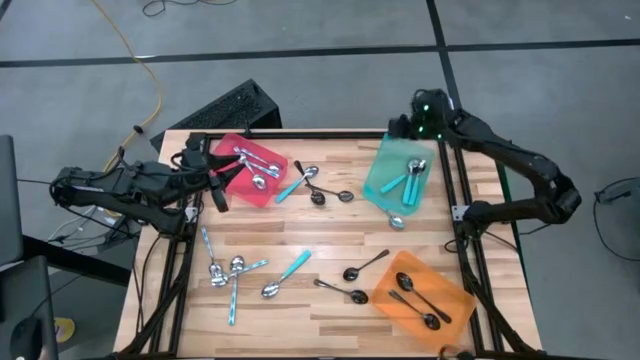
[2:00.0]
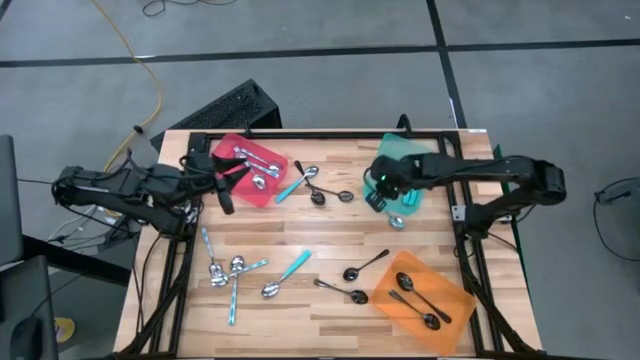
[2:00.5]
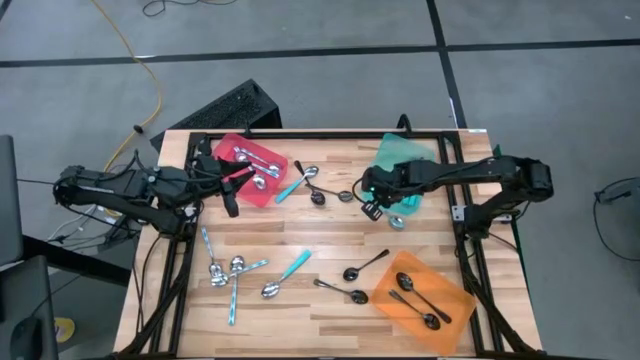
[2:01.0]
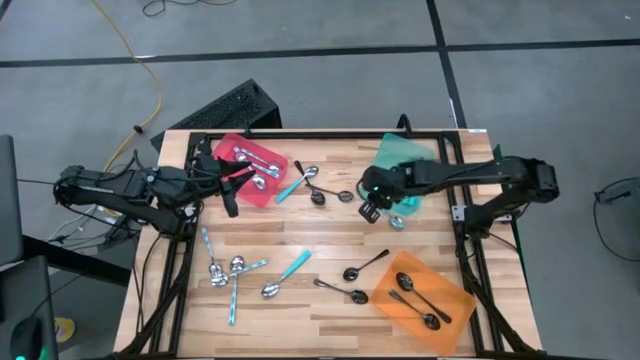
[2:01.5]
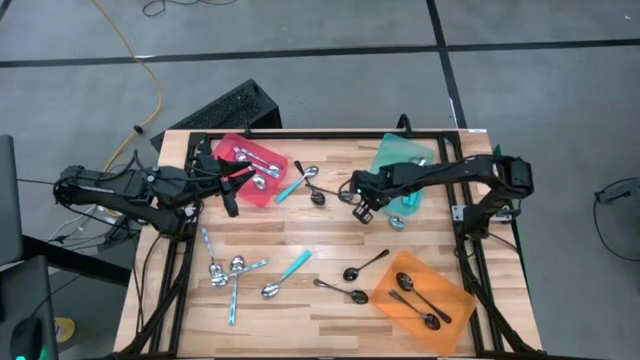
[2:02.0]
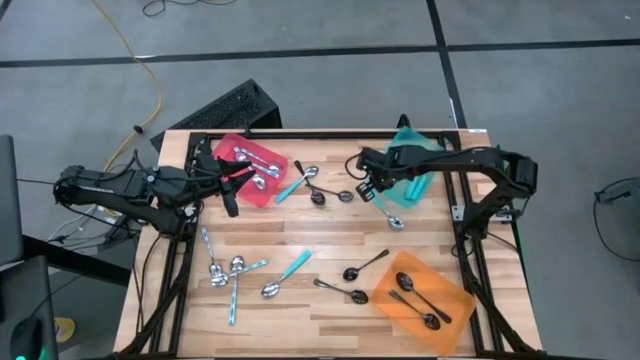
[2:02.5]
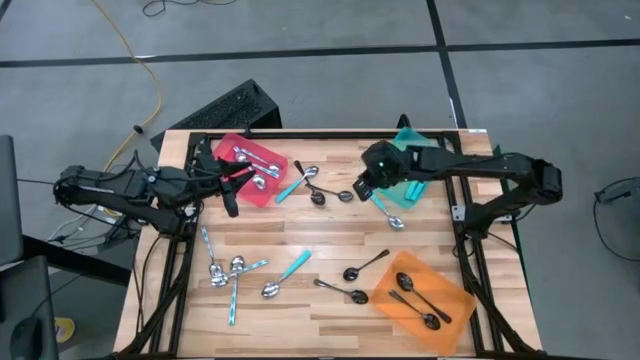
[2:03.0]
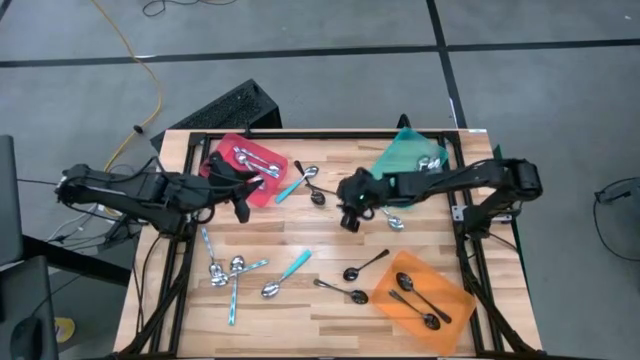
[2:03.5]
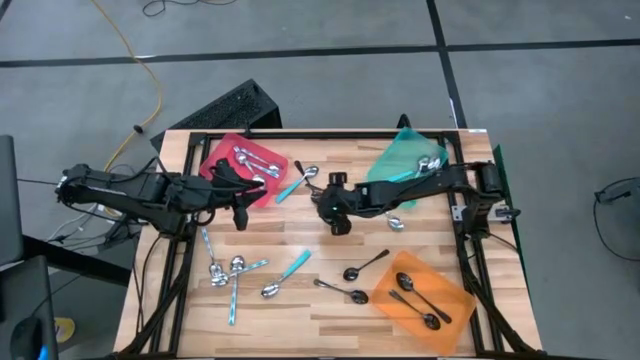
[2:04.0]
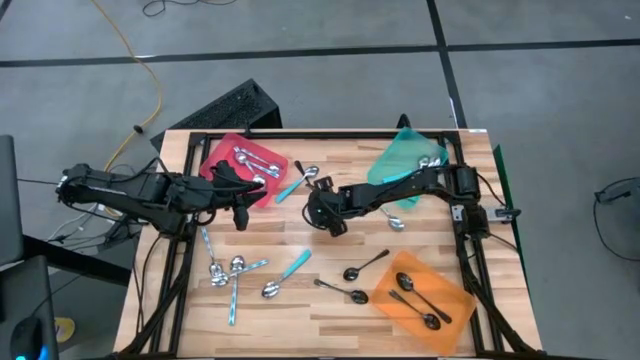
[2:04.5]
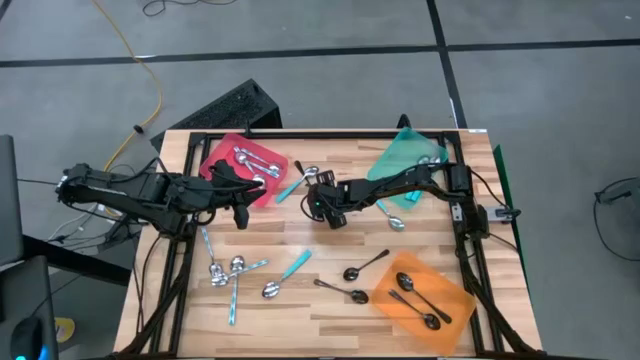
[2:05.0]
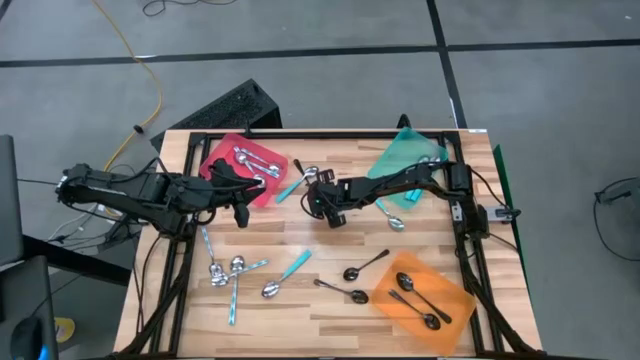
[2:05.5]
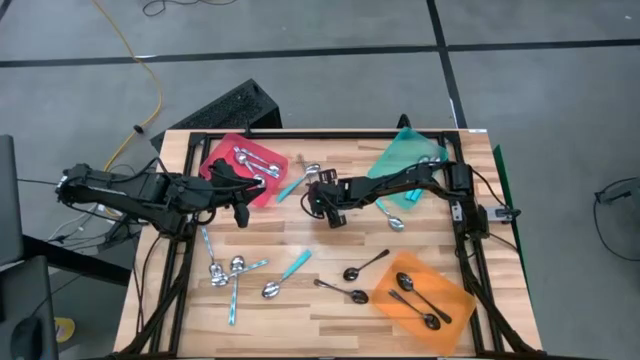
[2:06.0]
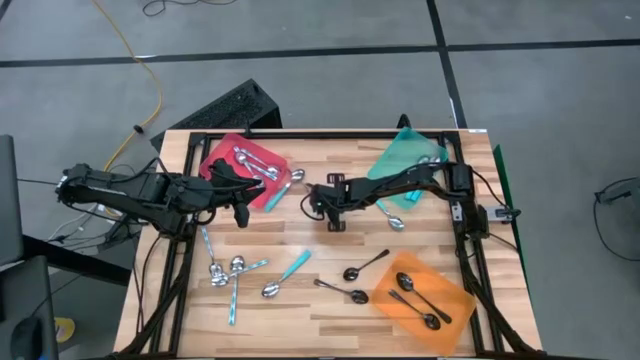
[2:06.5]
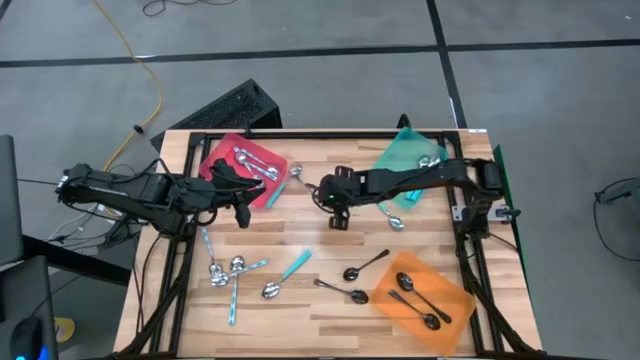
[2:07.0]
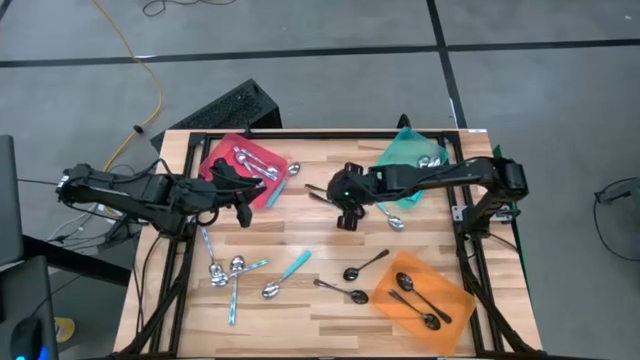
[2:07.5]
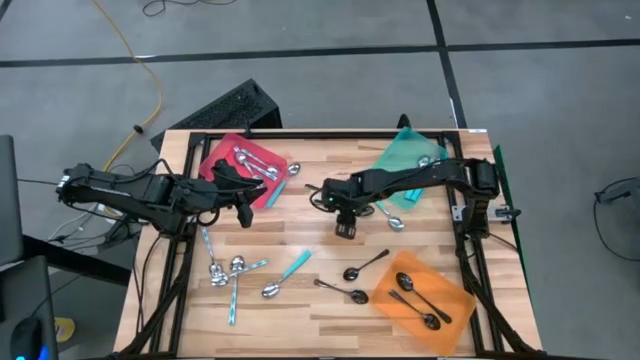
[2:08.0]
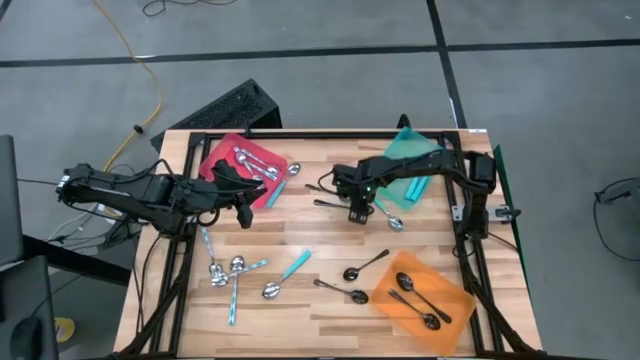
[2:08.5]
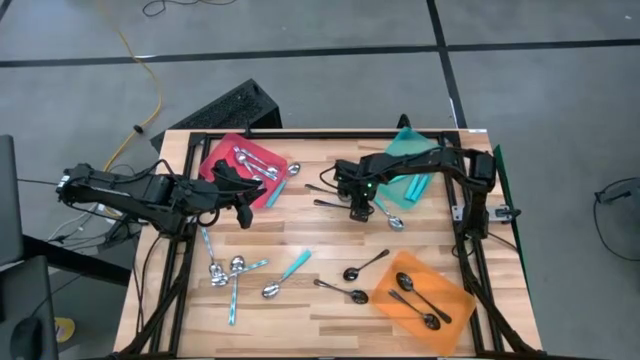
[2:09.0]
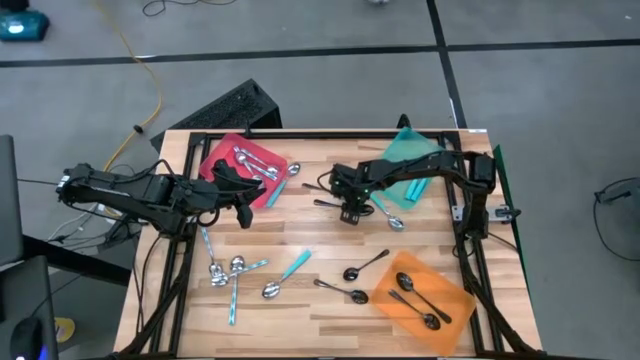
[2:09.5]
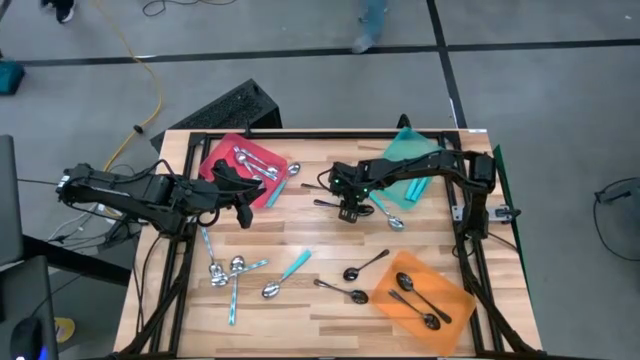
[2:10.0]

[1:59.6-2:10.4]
Task: Sort silverware by color (type)
Put the black spoon into the orange bin

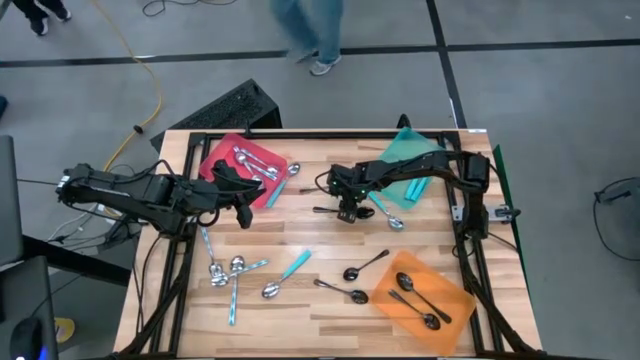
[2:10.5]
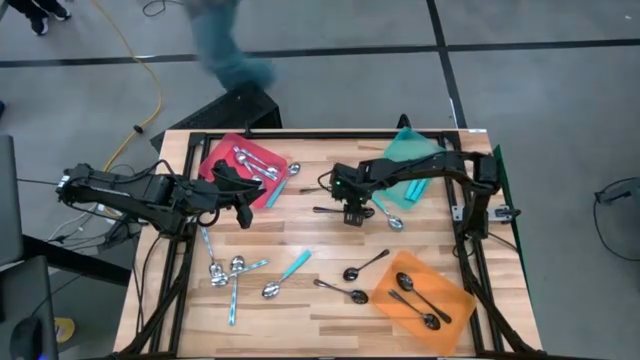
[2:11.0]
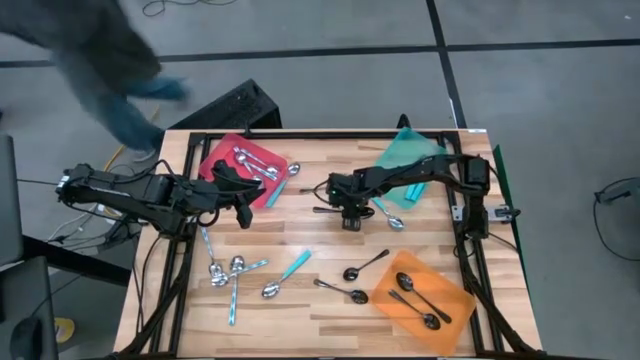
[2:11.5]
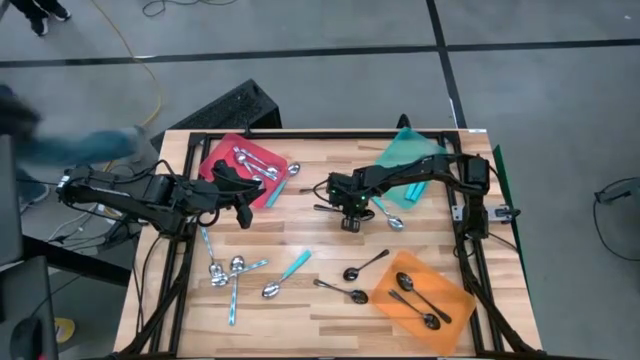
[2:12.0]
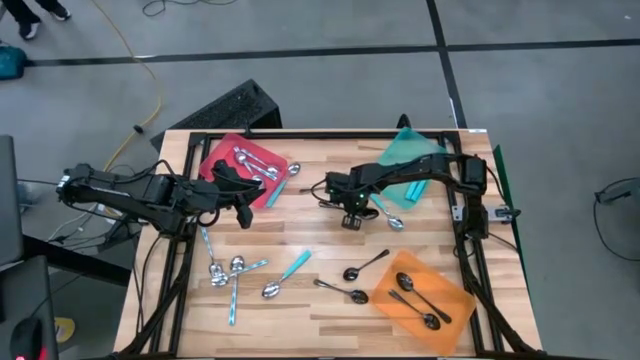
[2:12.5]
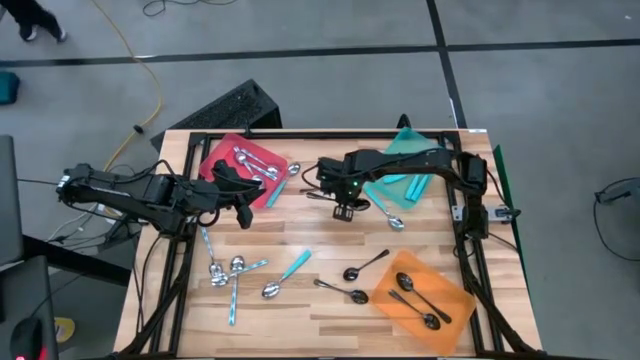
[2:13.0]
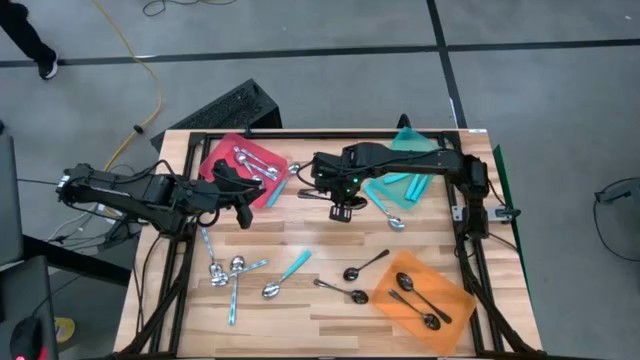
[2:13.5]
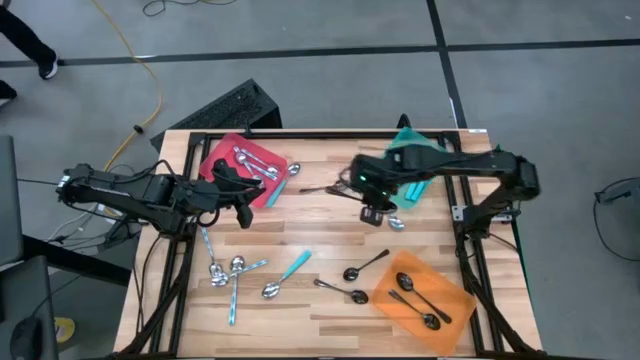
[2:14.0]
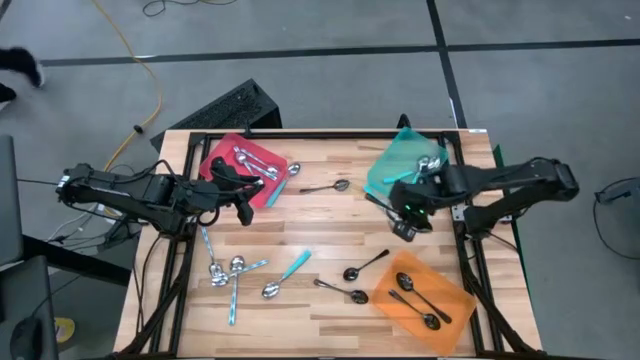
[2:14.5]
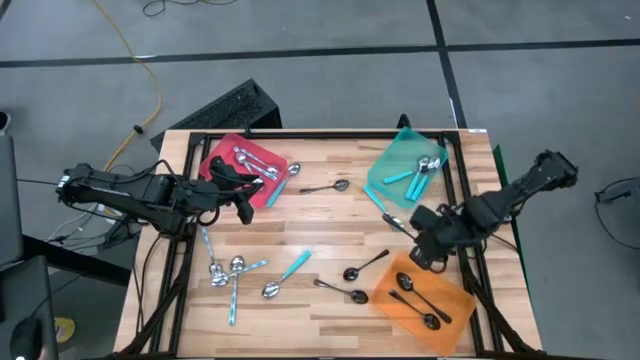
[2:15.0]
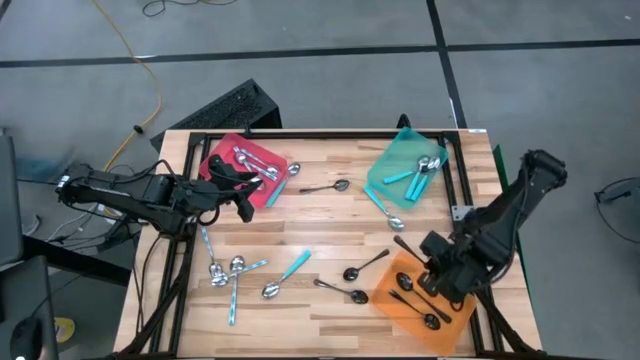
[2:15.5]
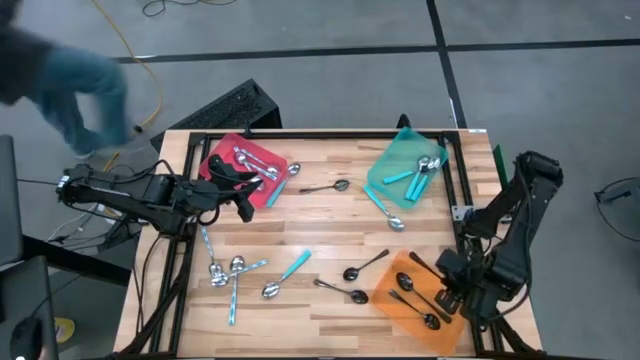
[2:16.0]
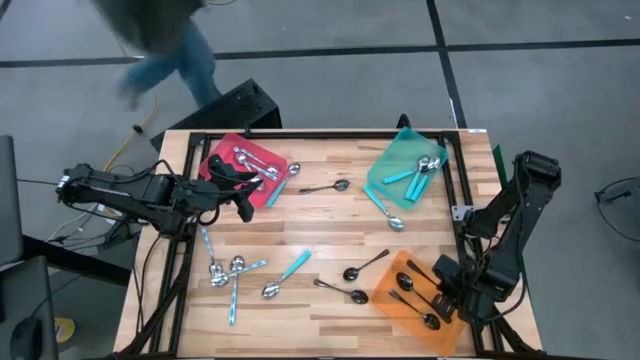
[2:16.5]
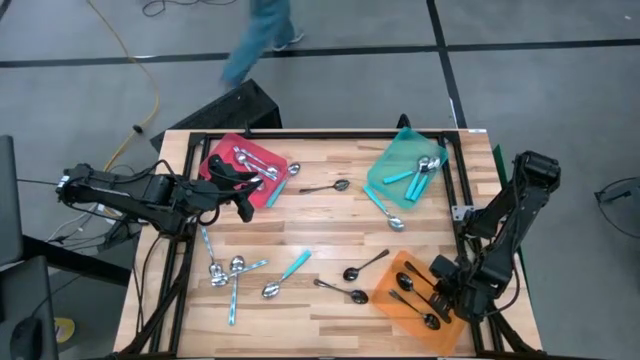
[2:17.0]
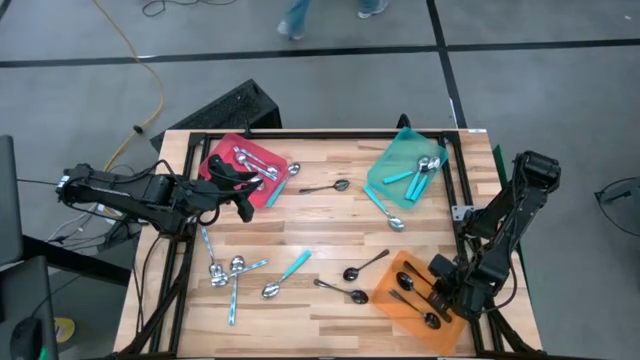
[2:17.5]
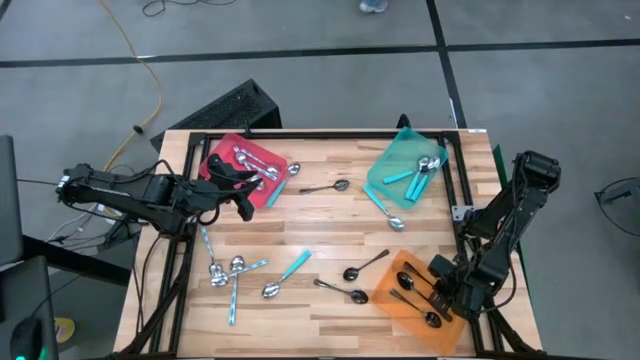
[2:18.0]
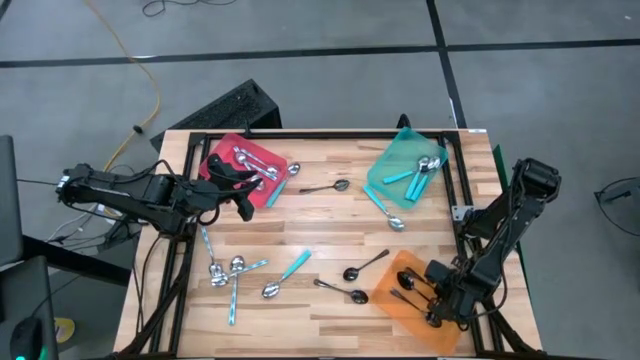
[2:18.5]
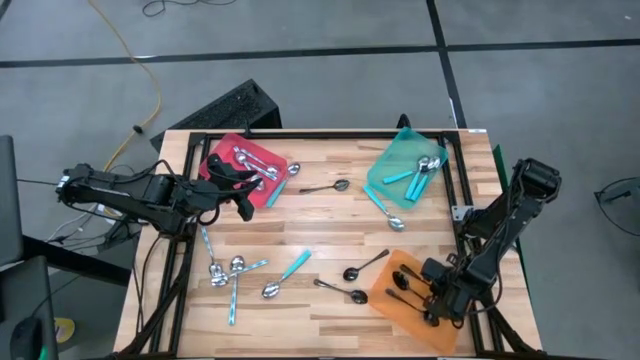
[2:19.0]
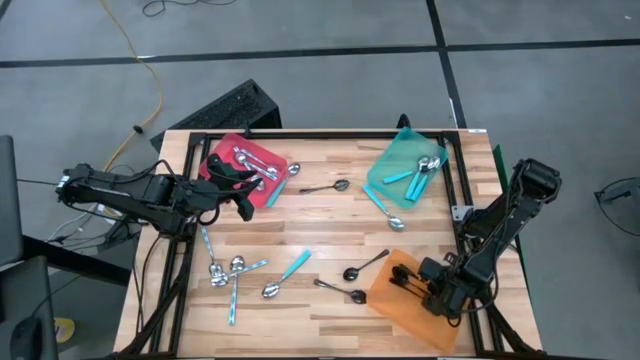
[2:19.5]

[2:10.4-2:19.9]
Put the black spoon into the orange bin

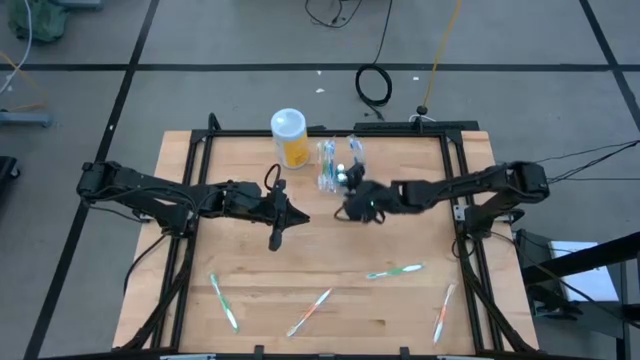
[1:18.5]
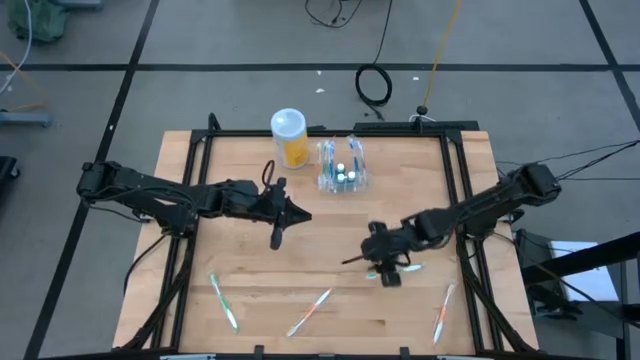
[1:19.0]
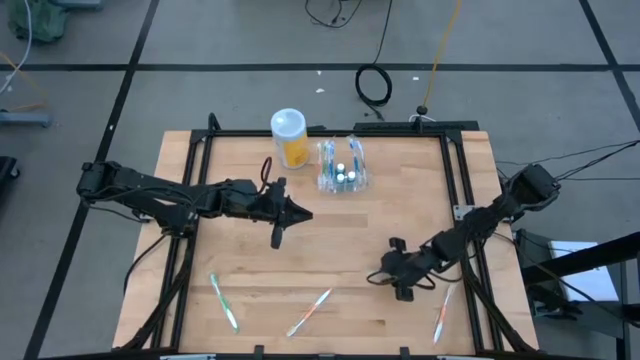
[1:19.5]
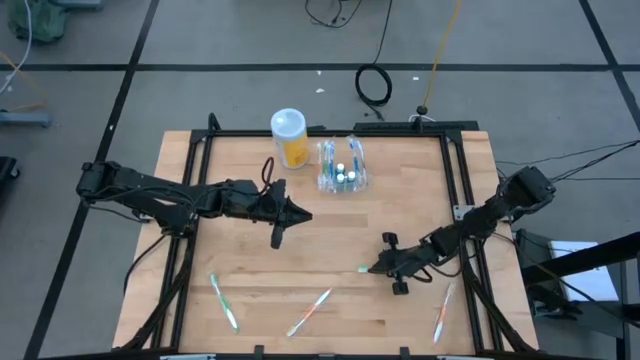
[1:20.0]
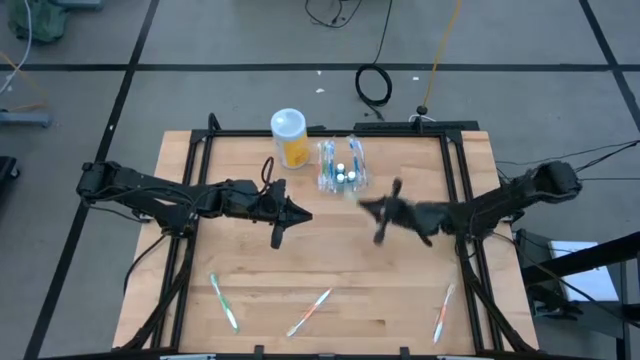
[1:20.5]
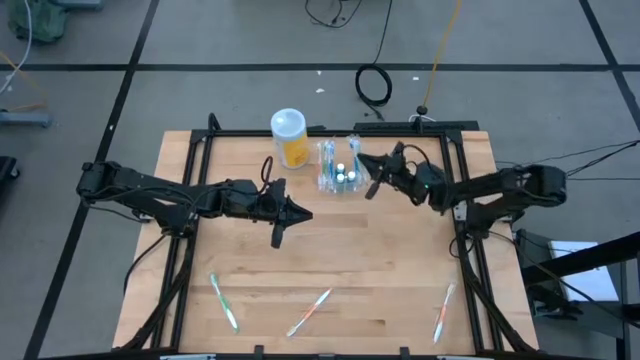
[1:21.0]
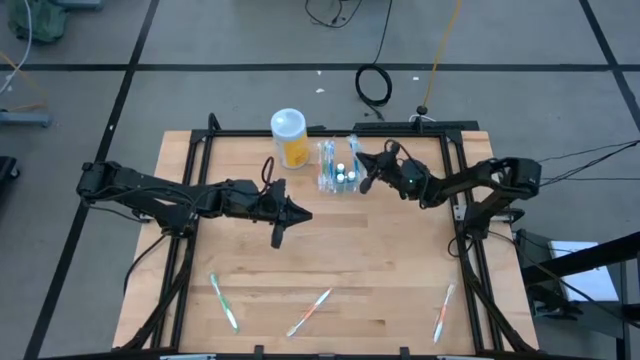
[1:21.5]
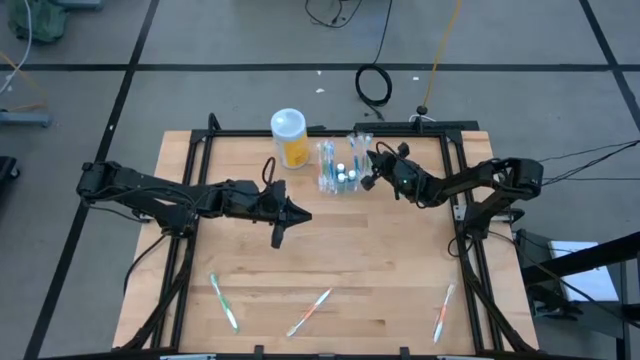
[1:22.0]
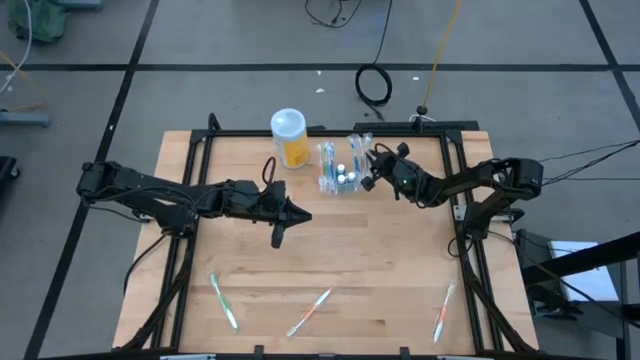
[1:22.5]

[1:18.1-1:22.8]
Task: Pick & Place toothbrushing station
Put the right green toothbrush into the transparent organizer
